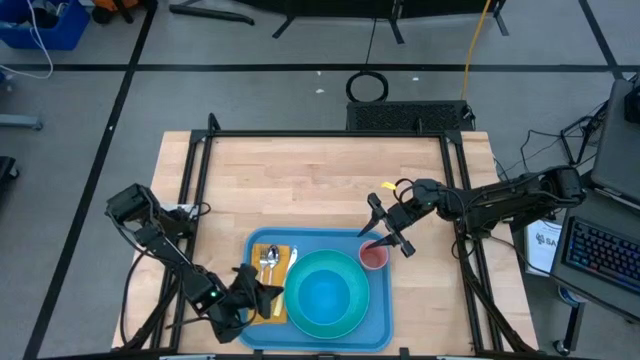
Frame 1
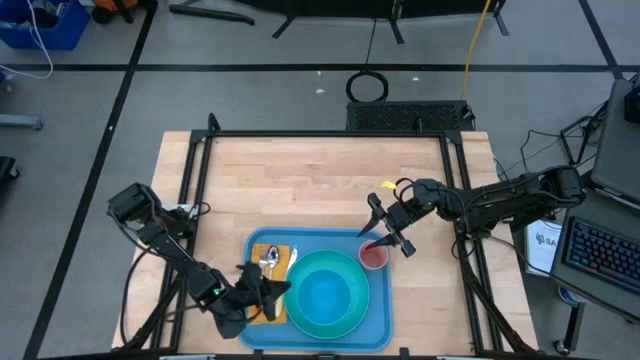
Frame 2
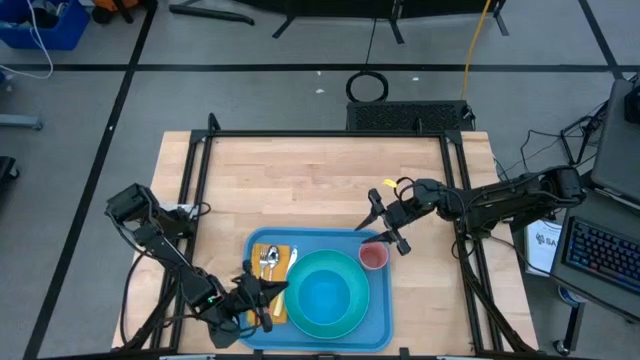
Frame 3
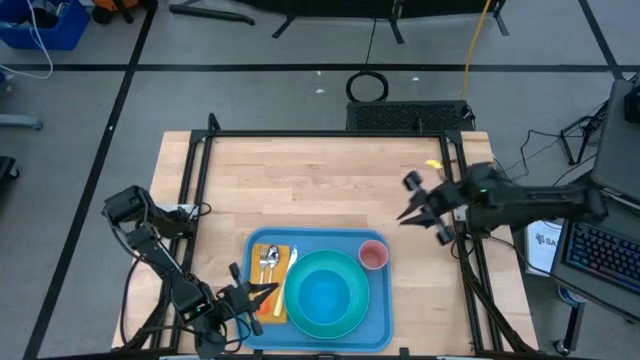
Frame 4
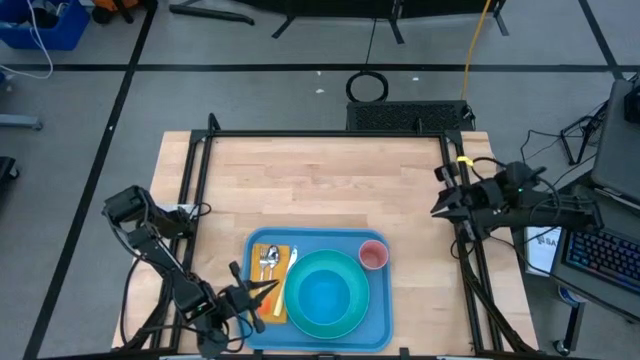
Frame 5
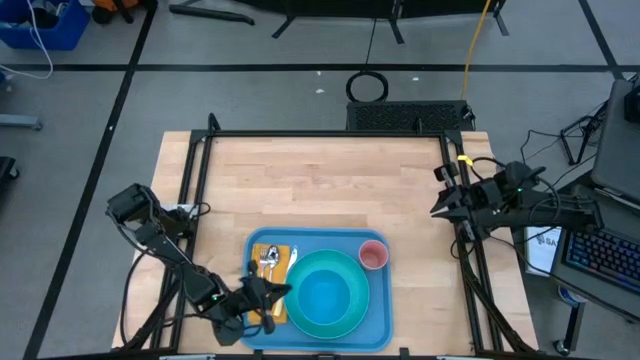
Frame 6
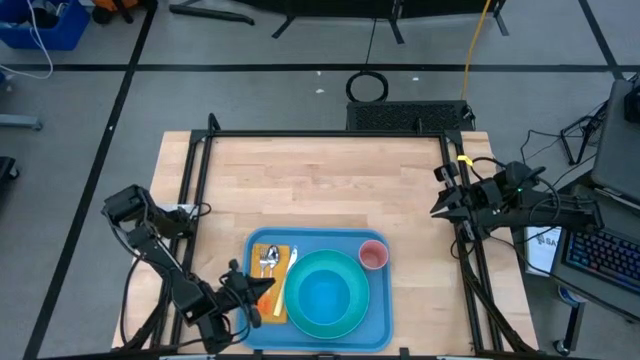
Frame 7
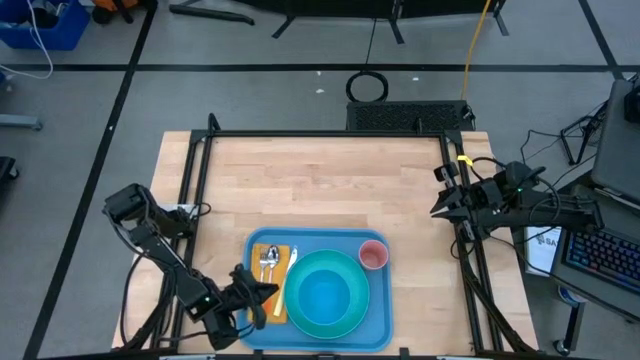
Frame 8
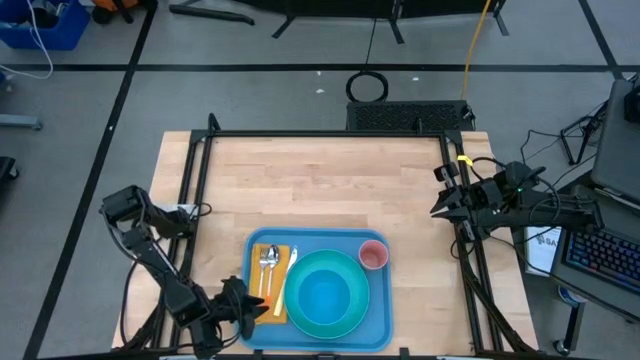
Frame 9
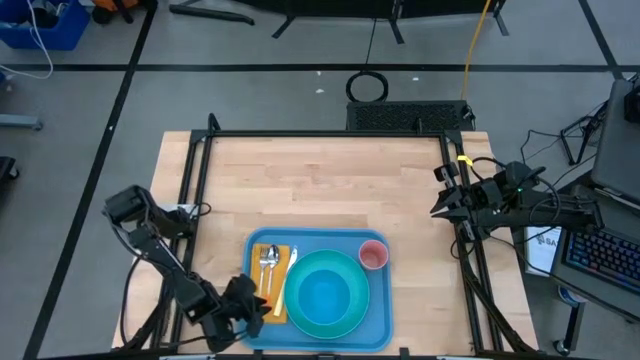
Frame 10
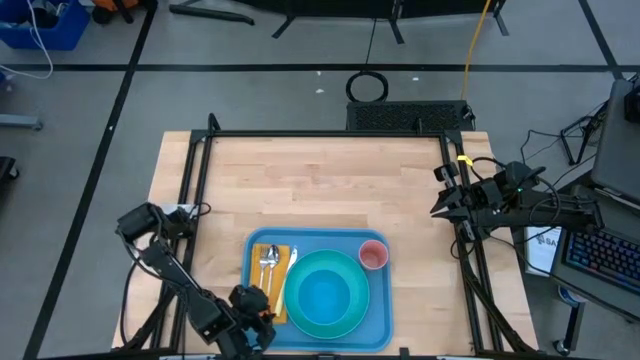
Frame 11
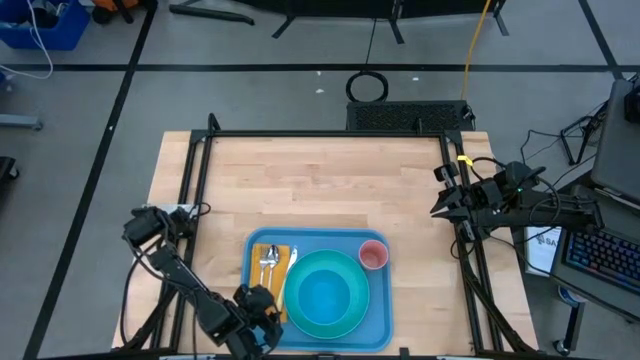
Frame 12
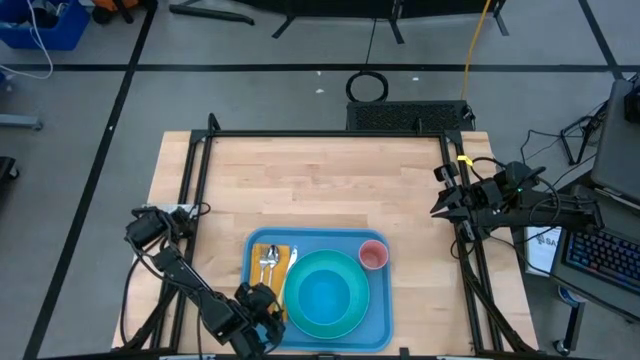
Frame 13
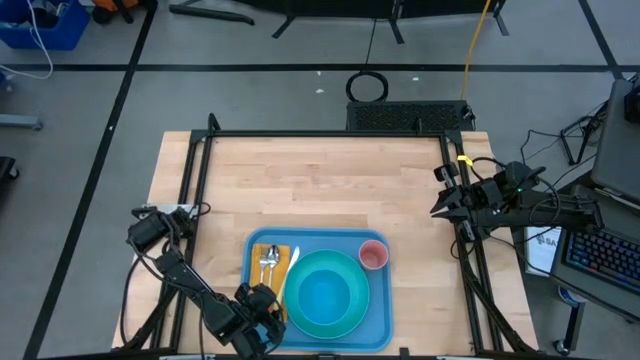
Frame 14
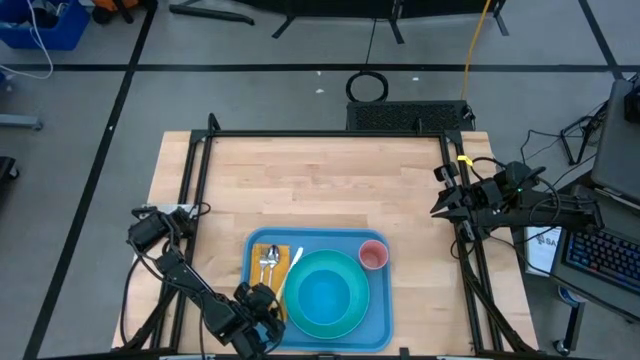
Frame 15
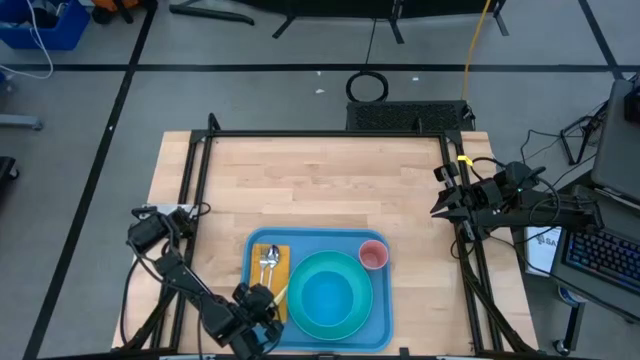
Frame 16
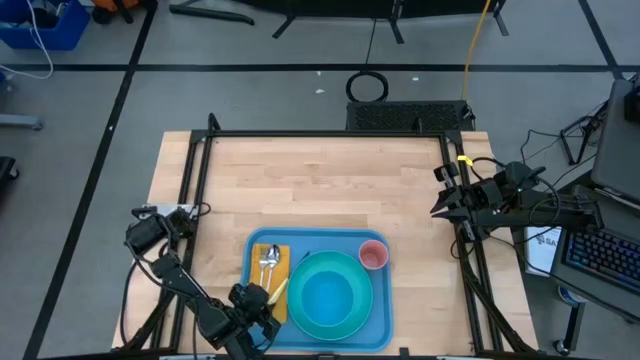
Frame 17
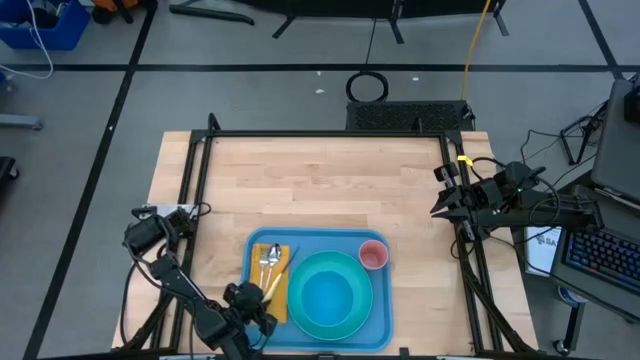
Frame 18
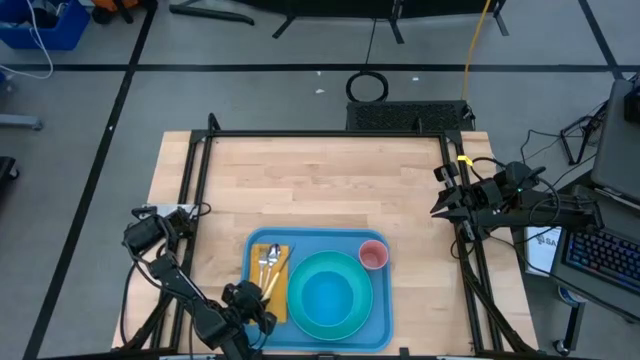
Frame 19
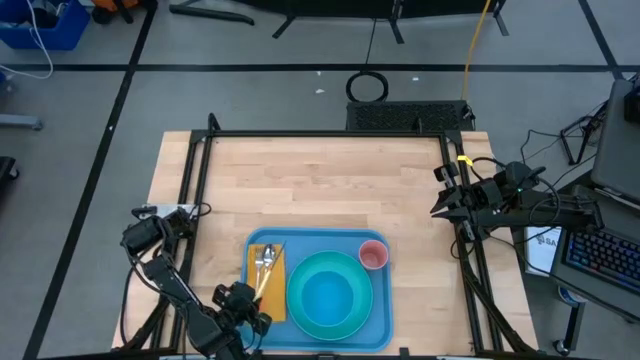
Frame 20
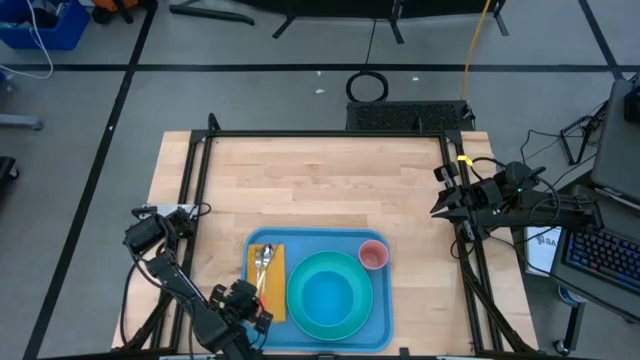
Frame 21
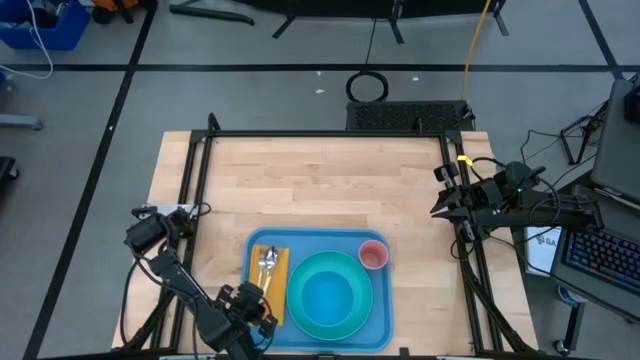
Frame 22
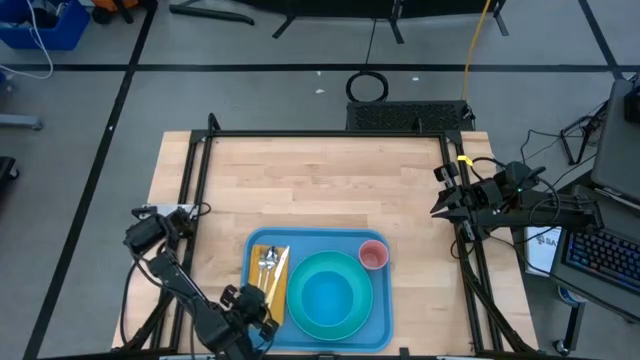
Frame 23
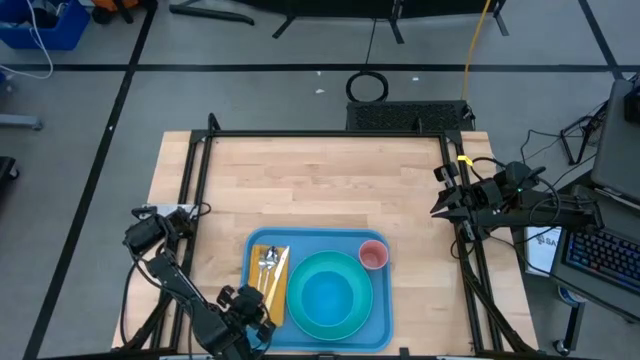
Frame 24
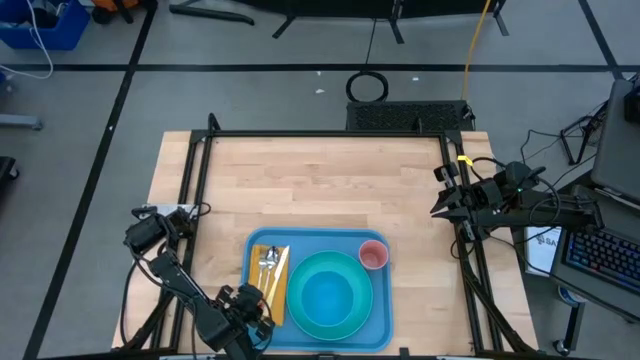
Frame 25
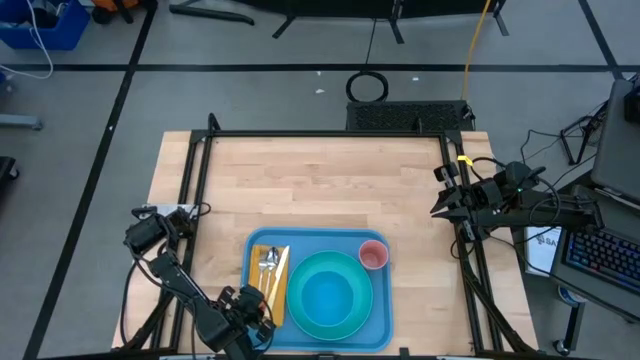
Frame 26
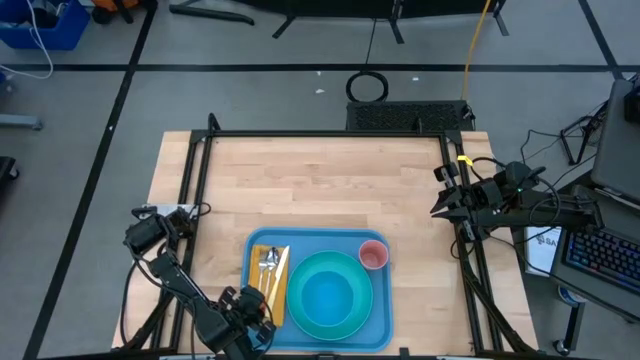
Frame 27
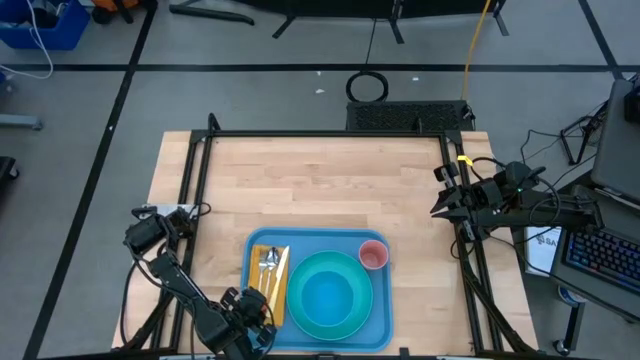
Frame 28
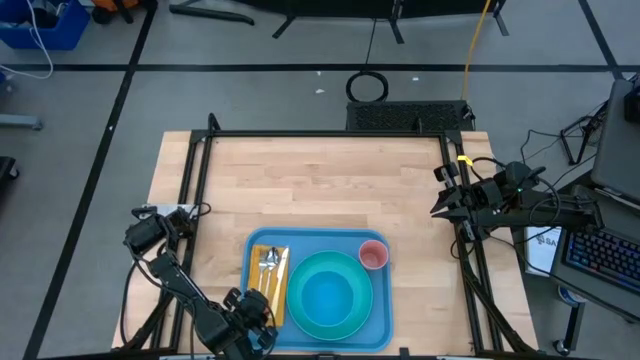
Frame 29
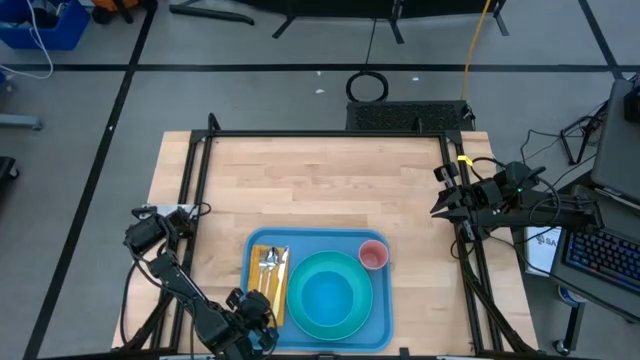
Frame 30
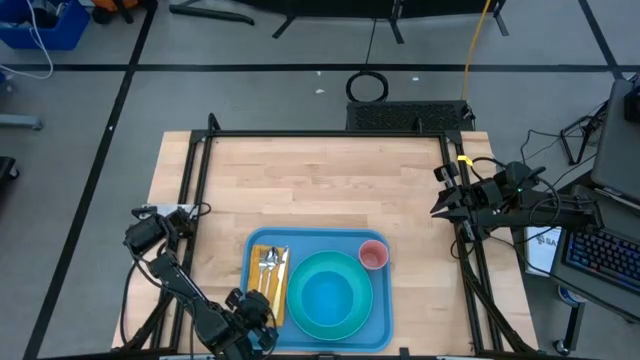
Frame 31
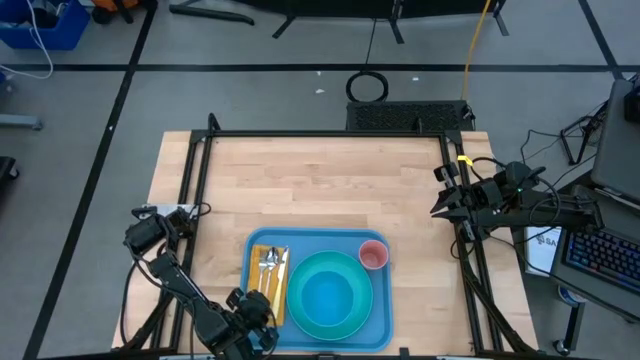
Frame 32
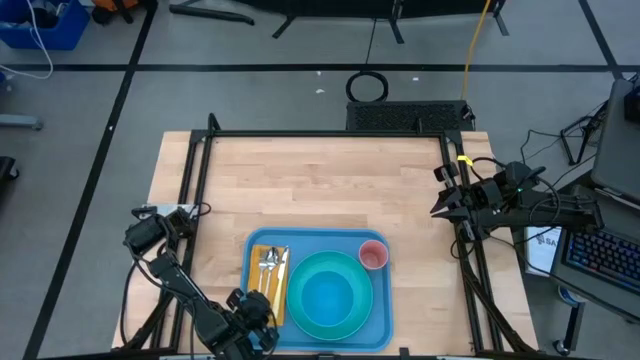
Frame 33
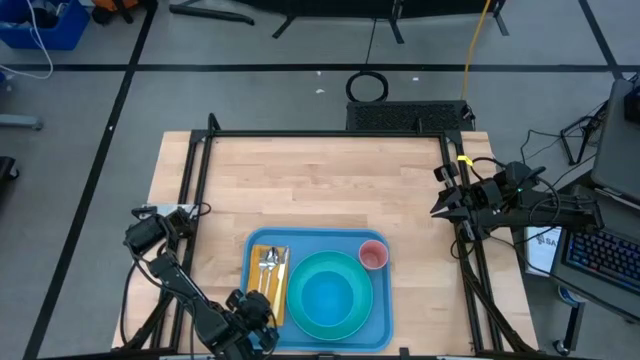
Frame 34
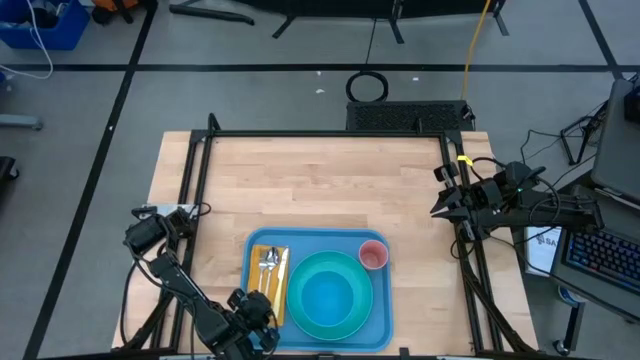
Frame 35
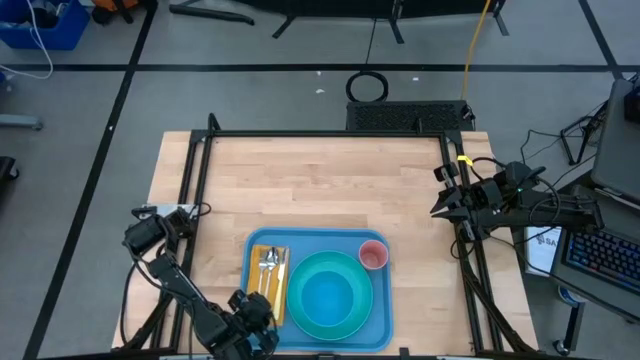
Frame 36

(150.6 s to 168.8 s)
Task: Set up tray
Put the yellow knife on the yellow napkin to the right of the orange spoon

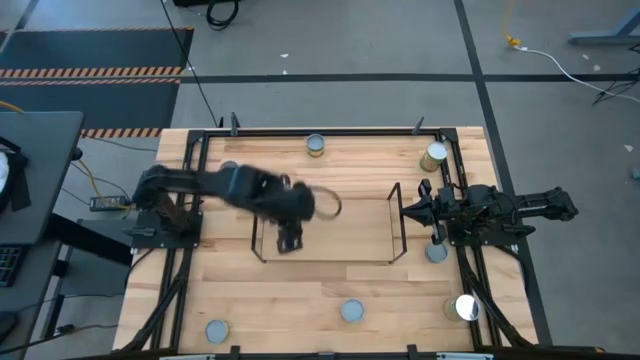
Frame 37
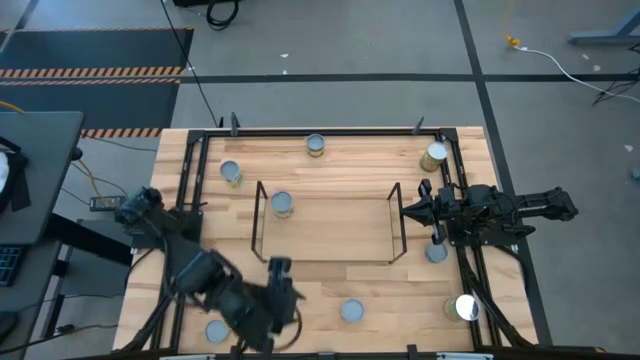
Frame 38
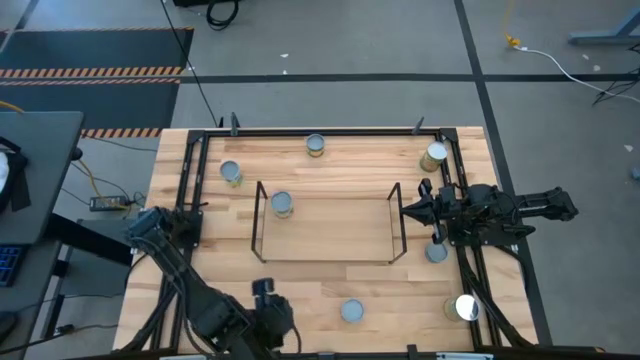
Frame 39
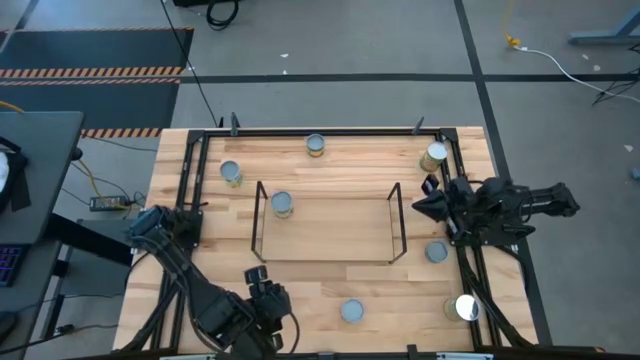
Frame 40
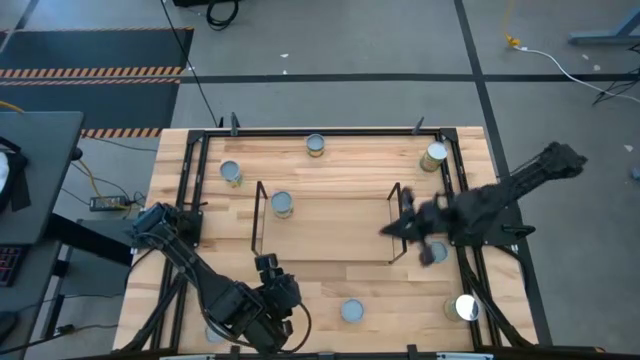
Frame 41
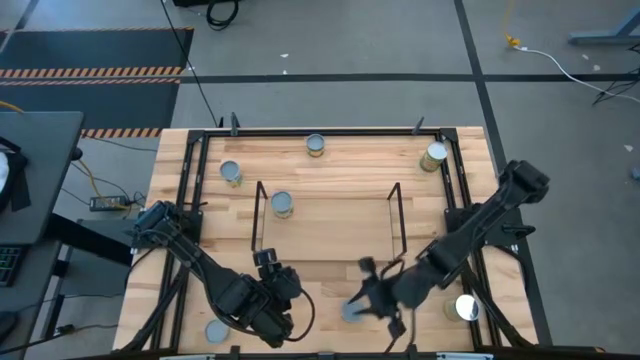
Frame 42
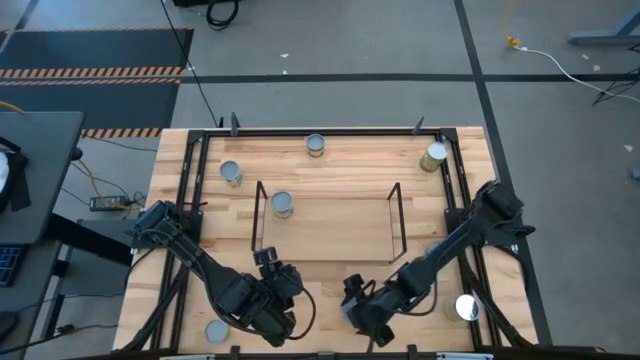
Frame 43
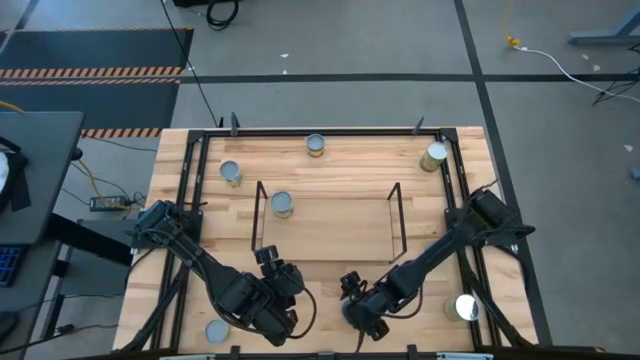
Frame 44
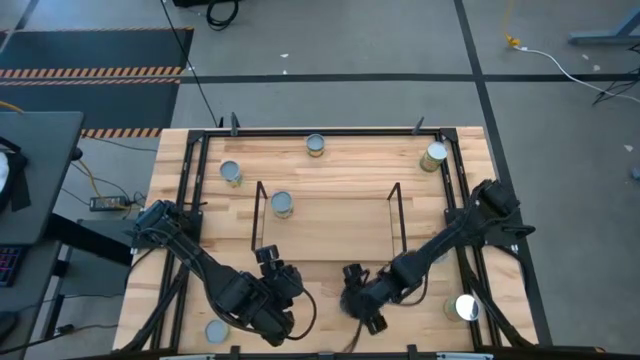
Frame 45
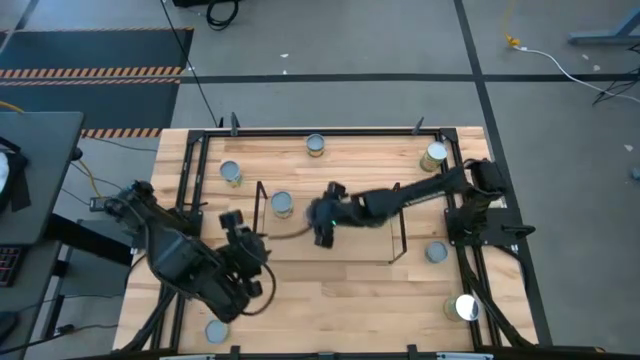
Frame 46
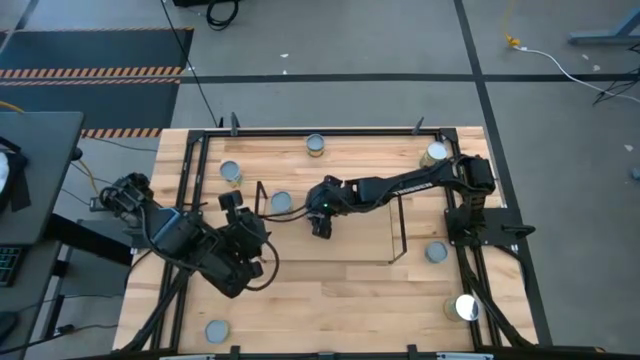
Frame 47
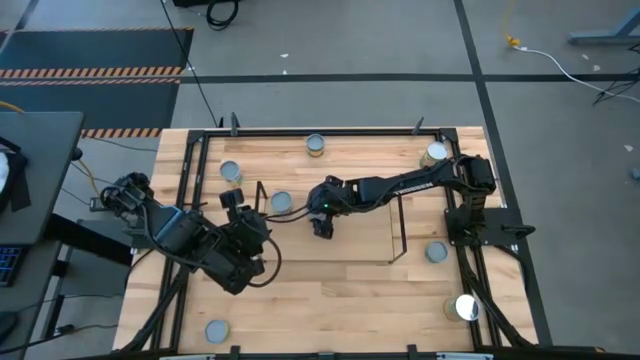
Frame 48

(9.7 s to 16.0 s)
Task: Pick and place cans onto a shelf
Put the red can on the shelf
